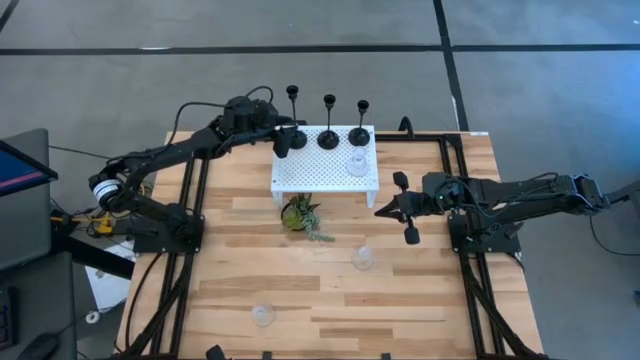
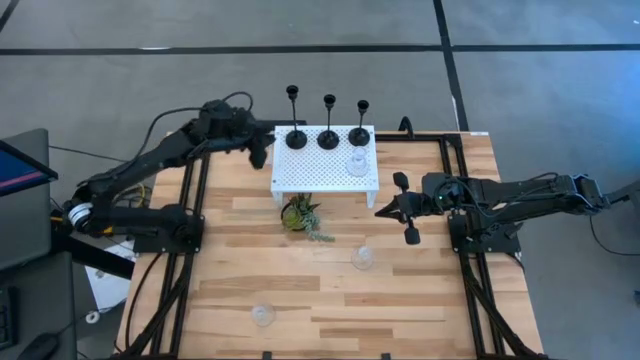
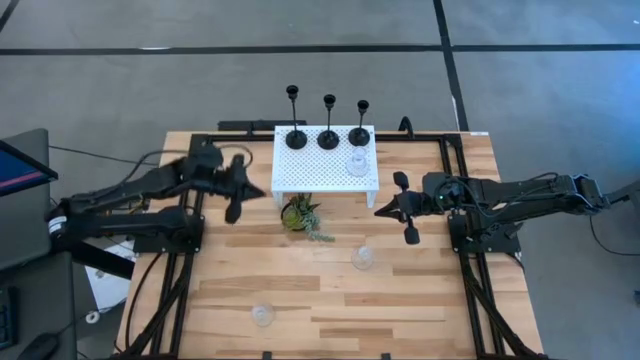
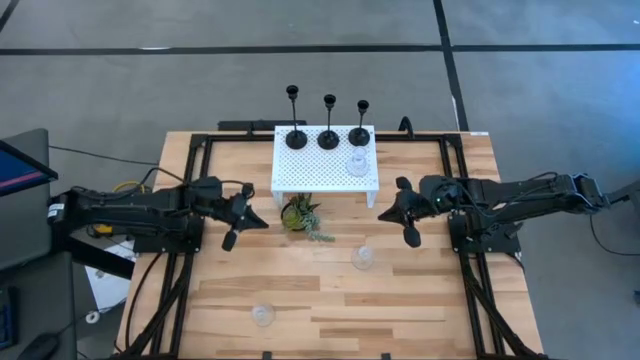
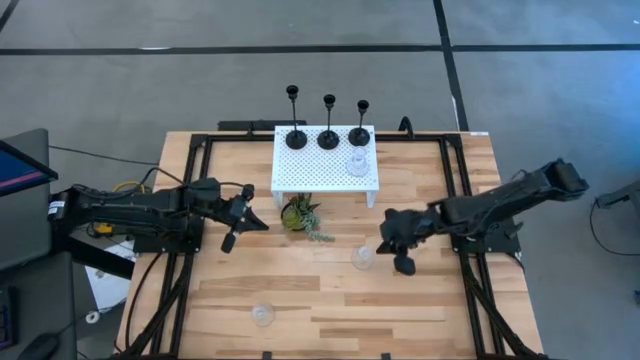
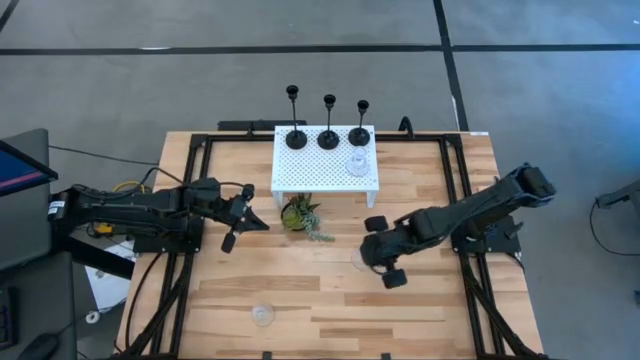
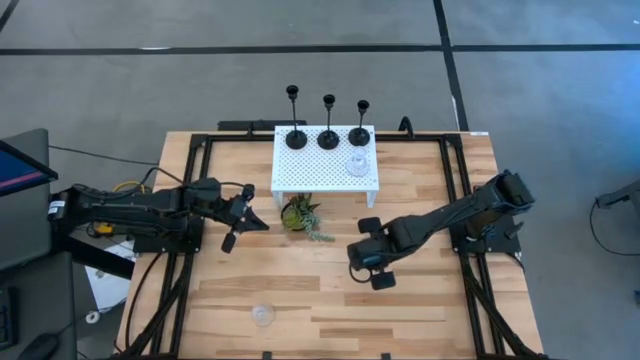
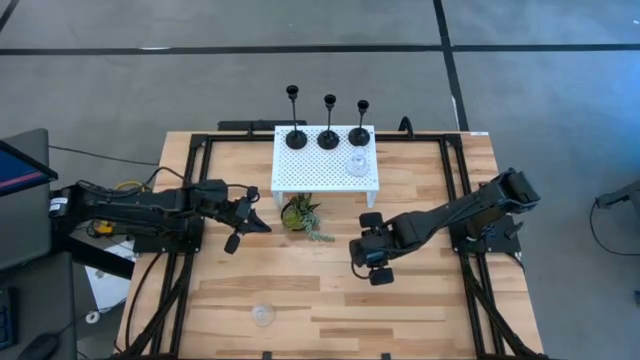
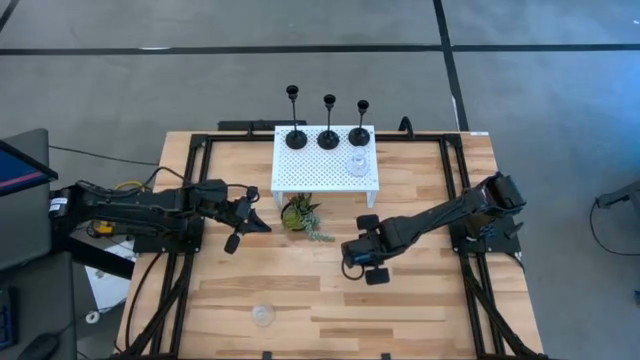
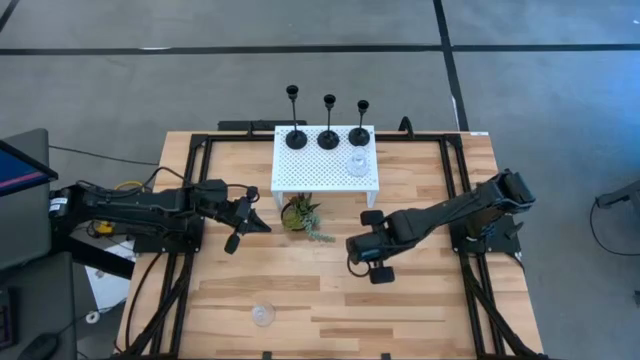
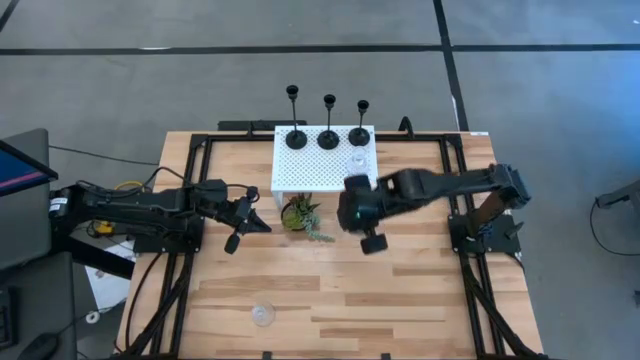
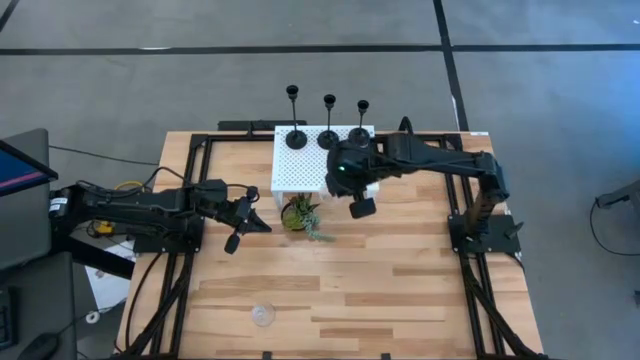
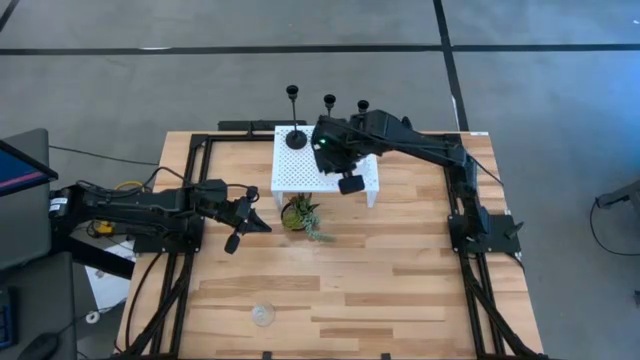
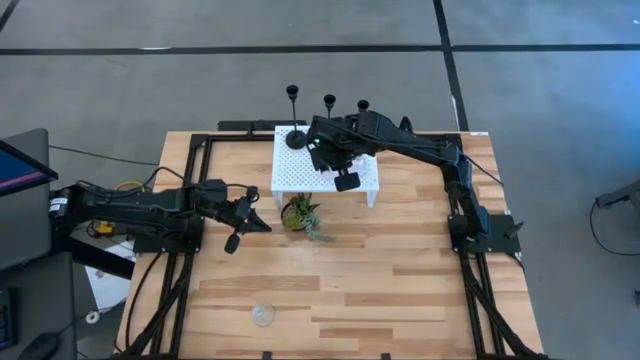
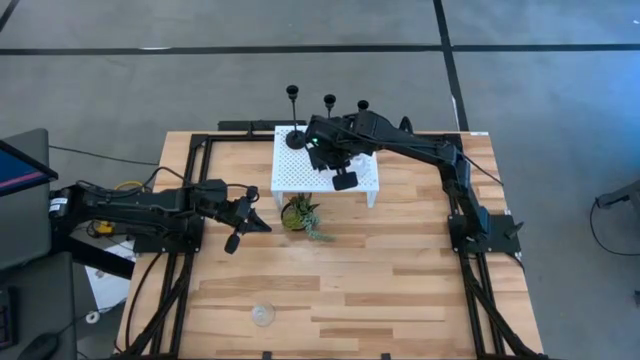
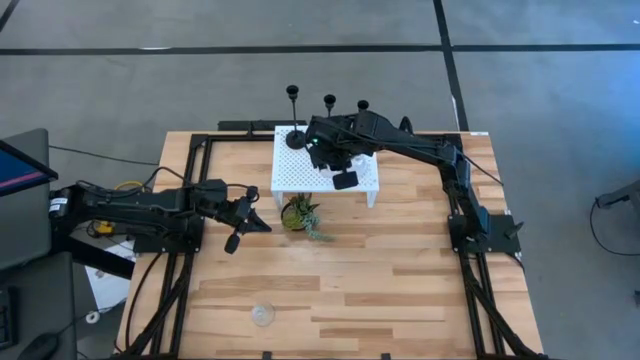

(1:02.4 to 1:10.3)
Task: Pick & Place candle stick holders
Put the top transparent glass candle holder on the shelf aligned with the transparent glass candle holder

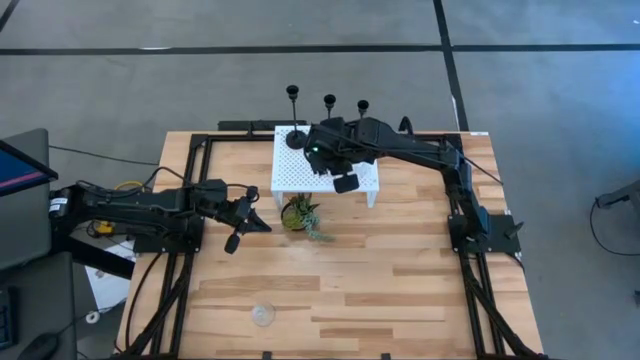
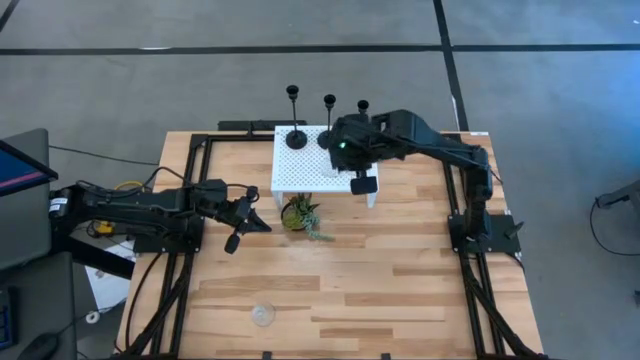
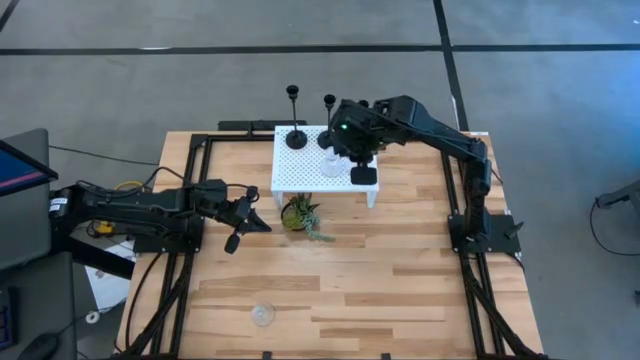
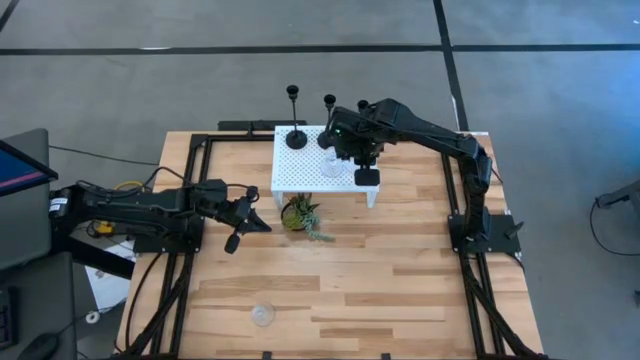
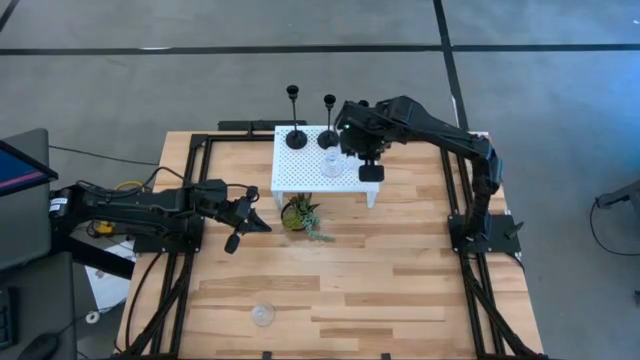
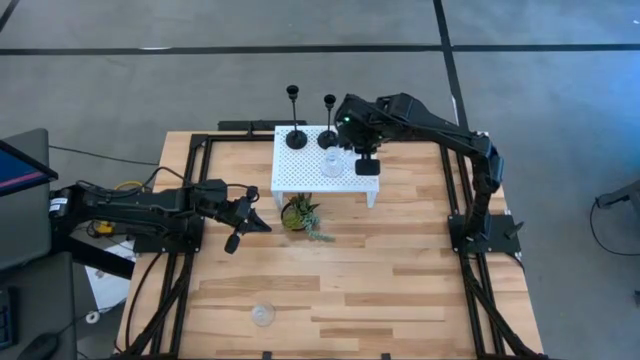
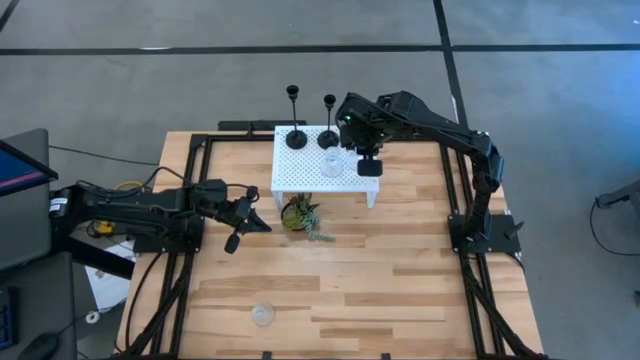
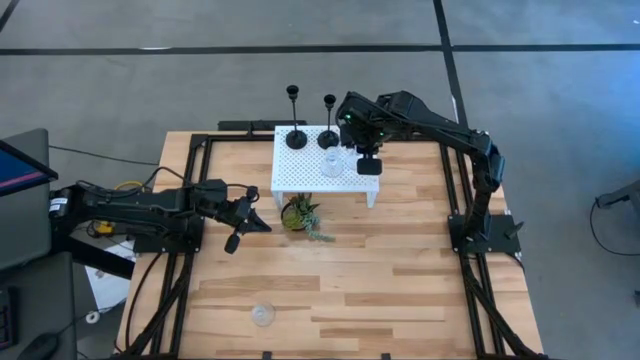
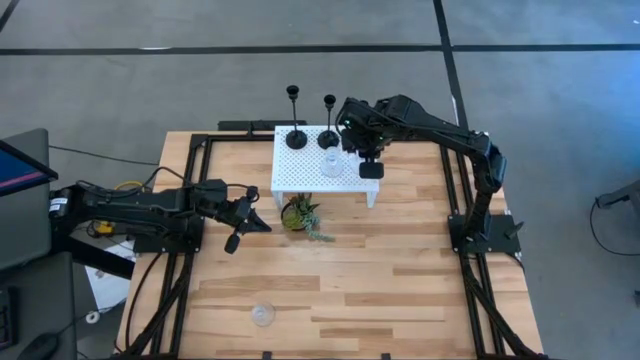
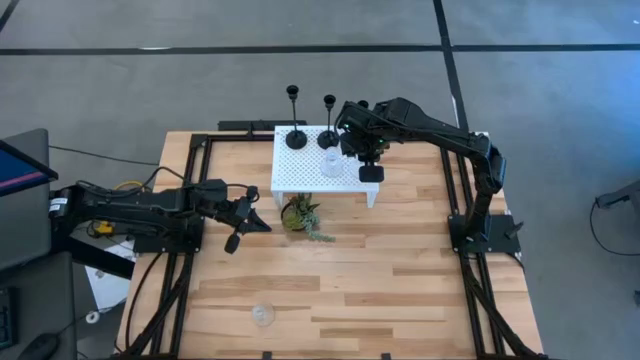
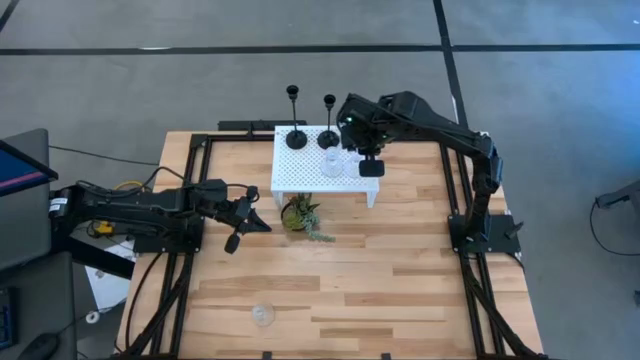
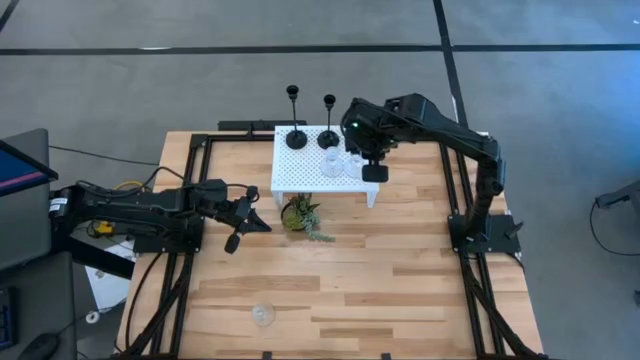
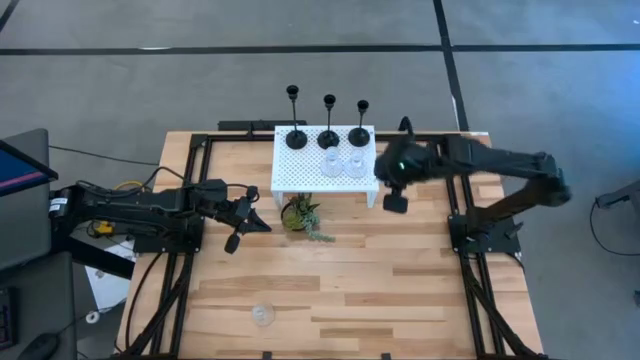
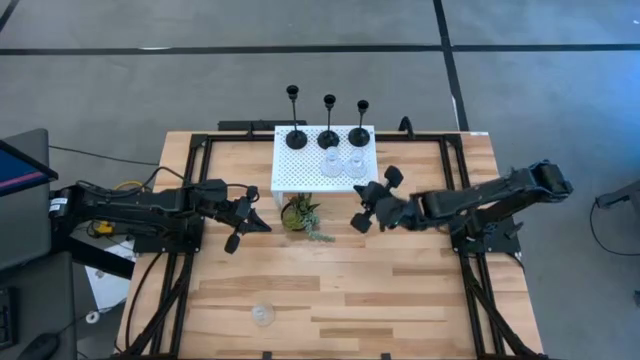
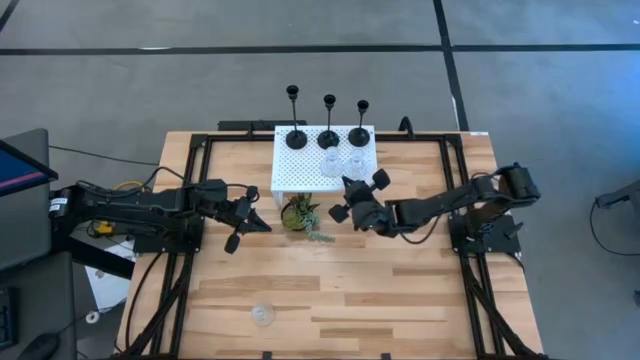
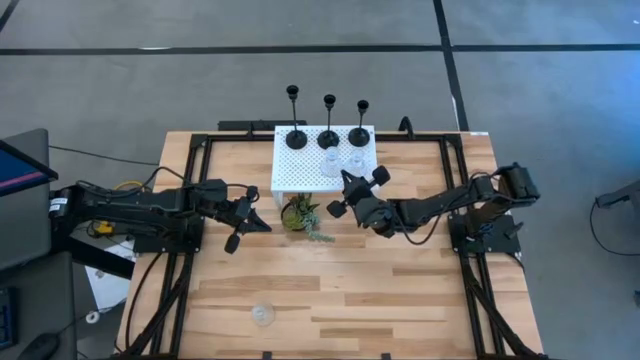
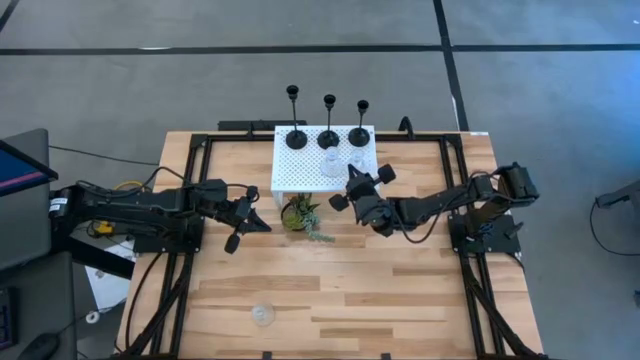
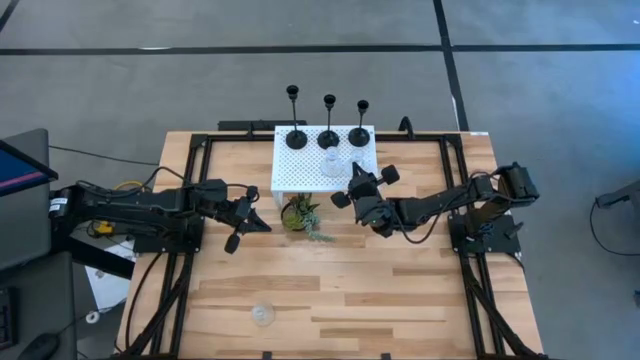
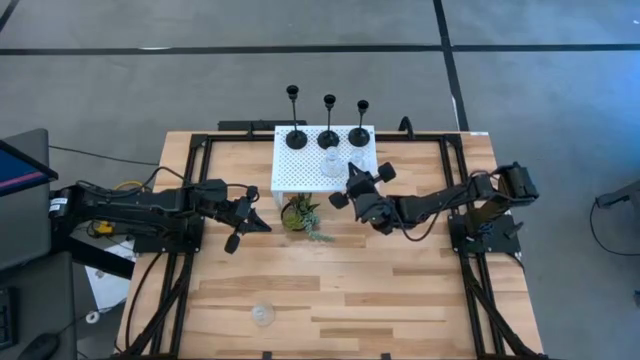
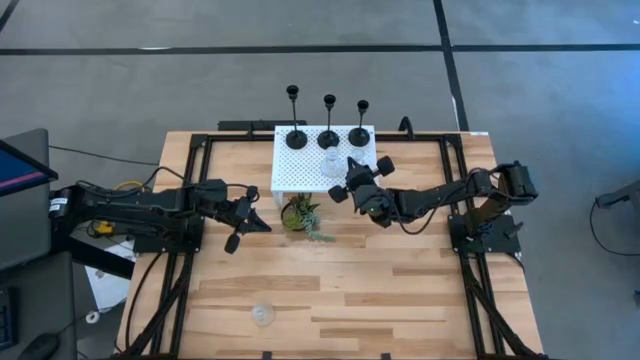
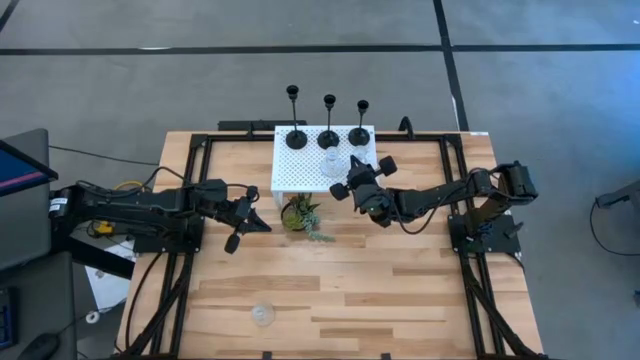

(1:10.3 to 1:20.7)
Adjust the transparent glass candle holder on the shelf

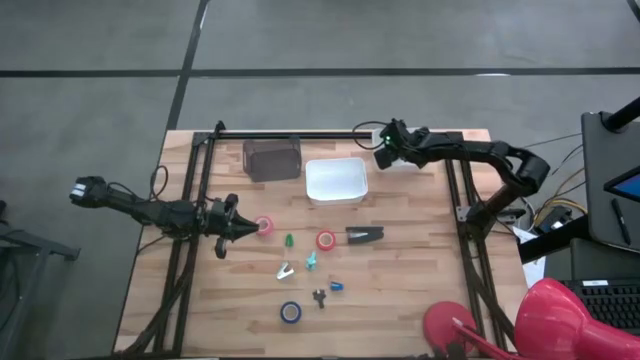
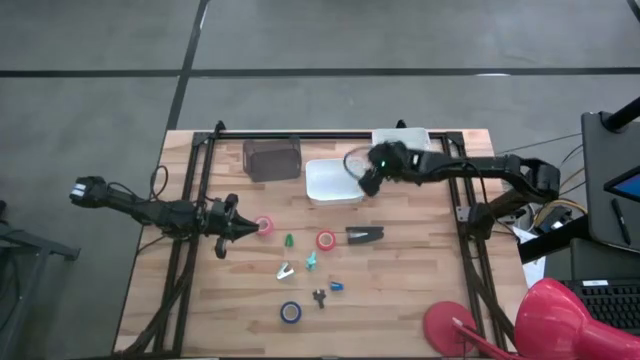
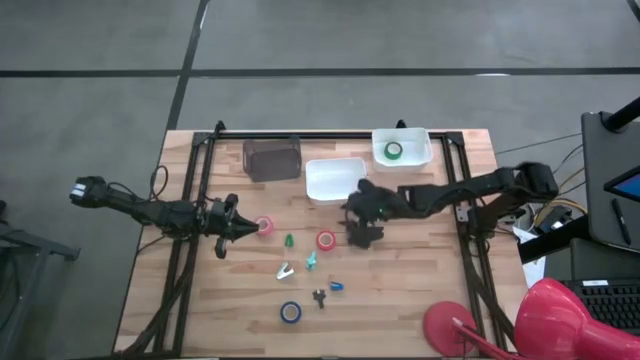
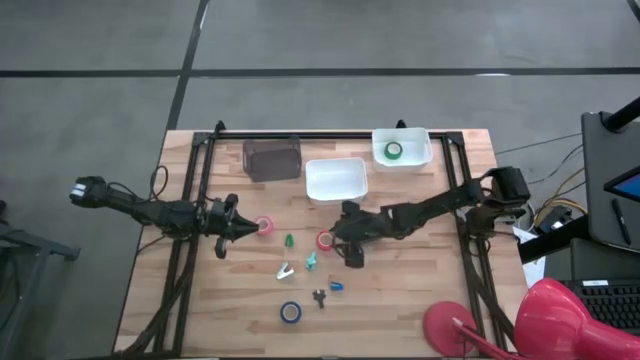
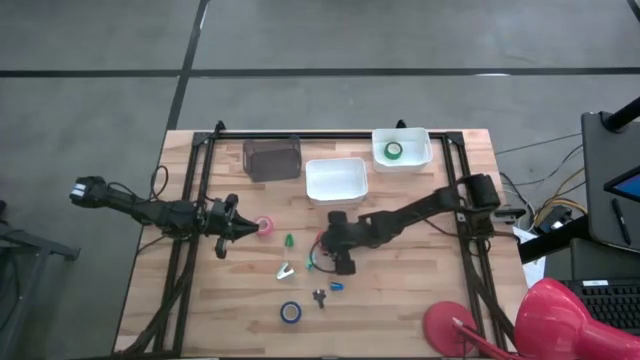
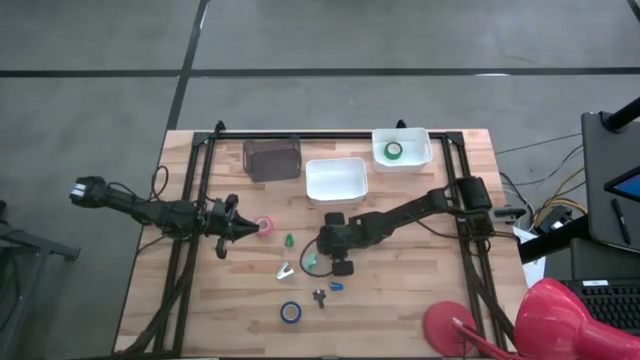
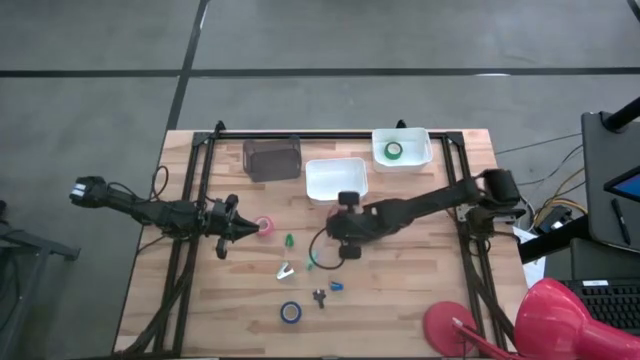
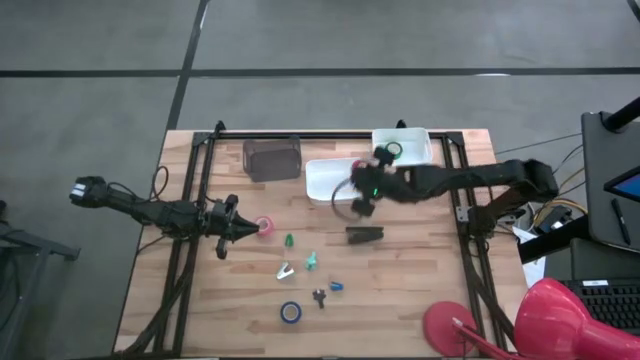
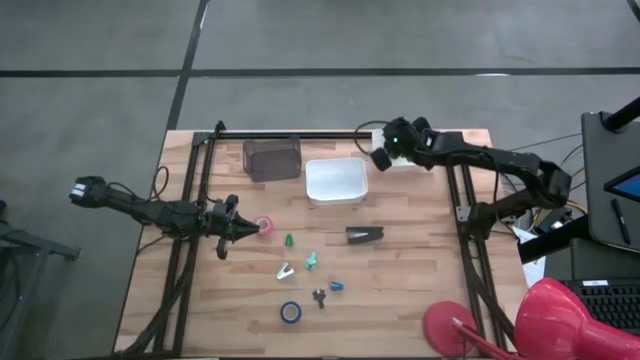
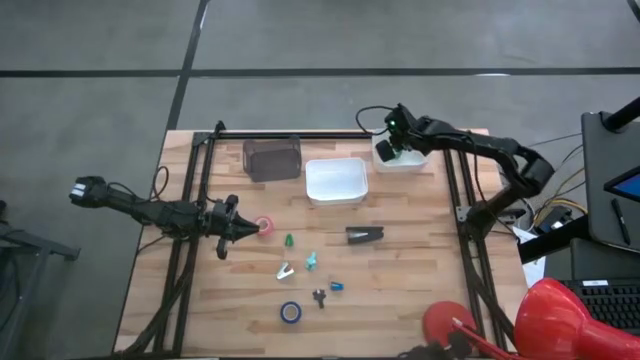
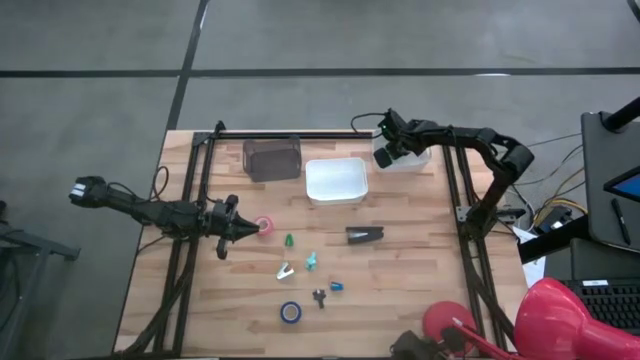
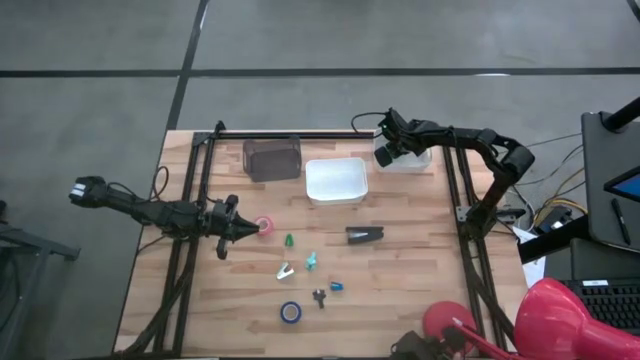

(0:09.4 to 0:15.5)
Task: Pick and place Stapler, Stapler remover, tape
Put the red tape into the right white bin
